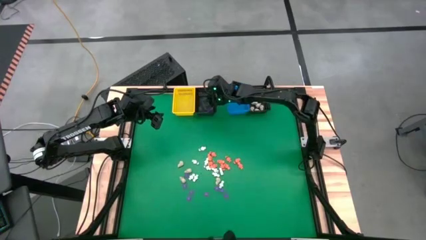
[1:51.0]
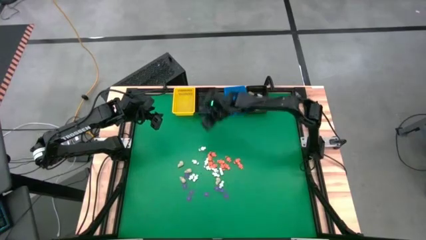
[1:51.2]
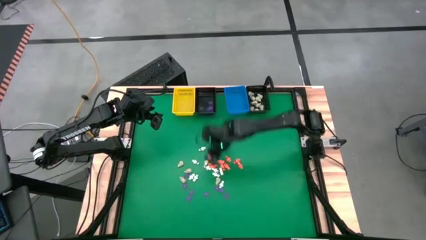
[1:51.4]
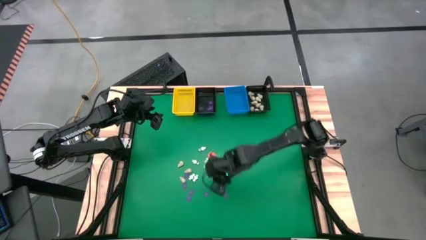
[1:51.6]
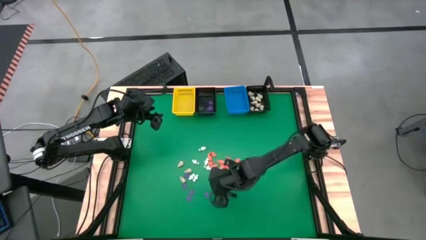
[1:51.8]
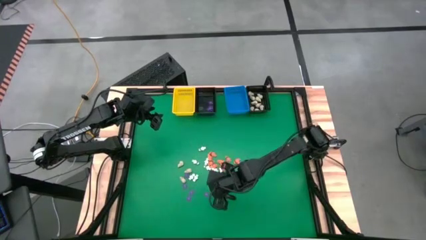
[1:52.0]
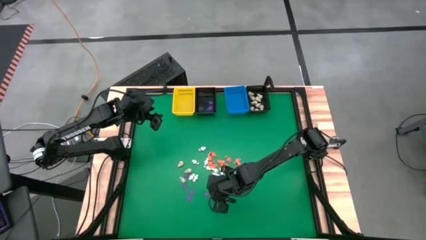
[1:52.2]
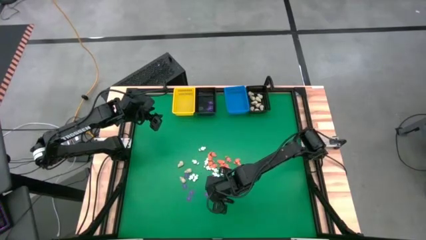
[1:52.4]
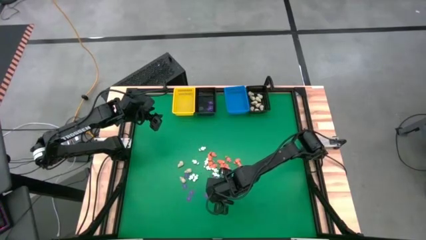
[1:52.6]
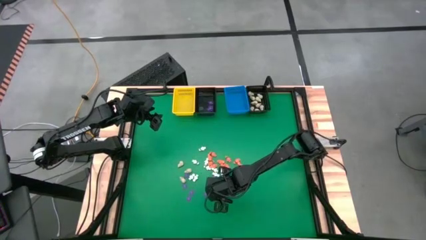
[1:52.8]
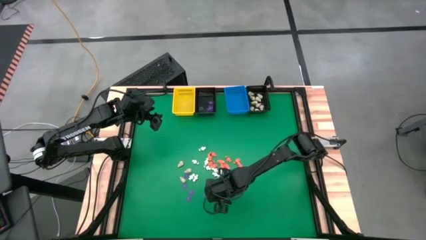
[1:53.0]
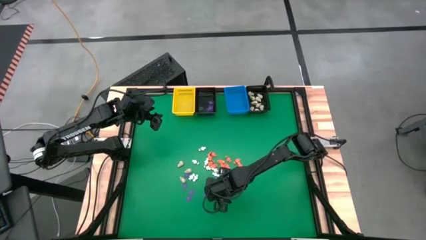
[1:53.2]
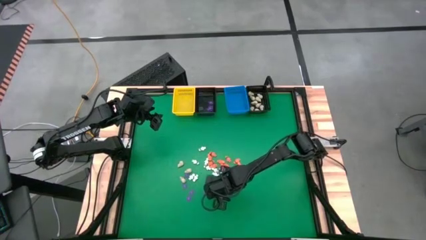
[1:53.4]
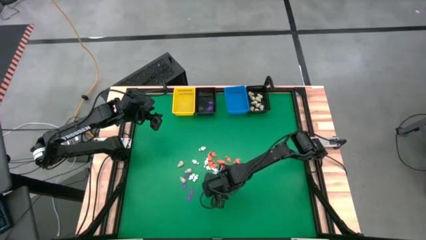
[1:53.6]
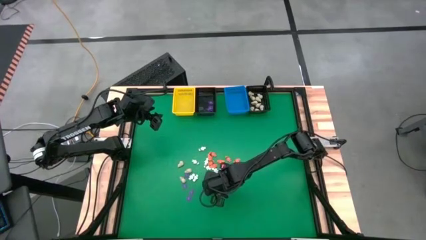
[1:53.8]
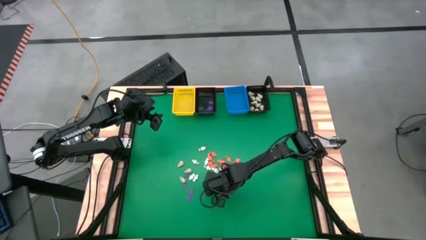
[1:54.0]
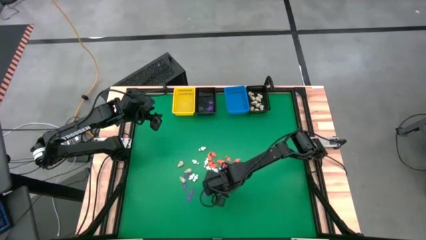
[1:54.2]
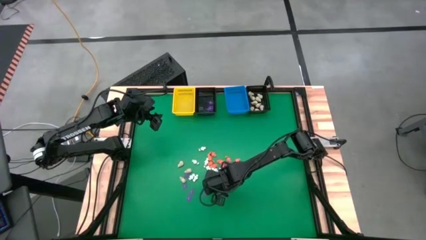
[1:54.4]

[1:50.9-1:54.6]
Task: Sort Halloween decoration
Put the purple spider toy into the left black basket

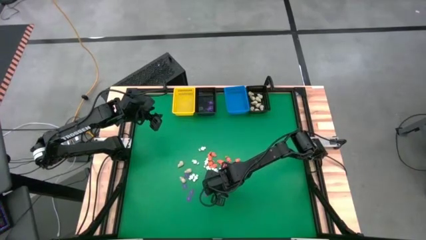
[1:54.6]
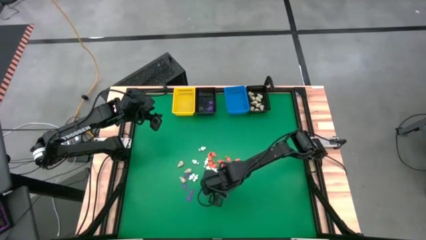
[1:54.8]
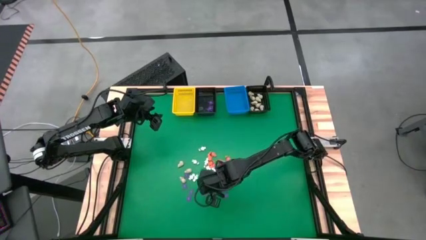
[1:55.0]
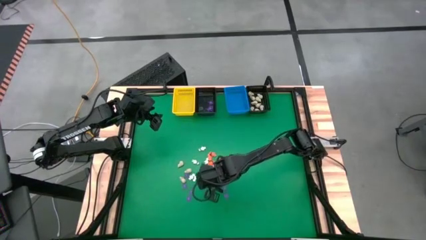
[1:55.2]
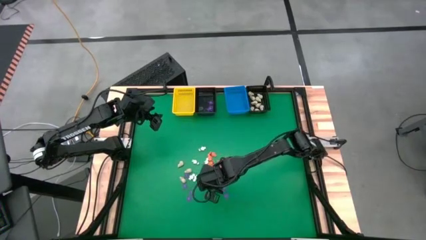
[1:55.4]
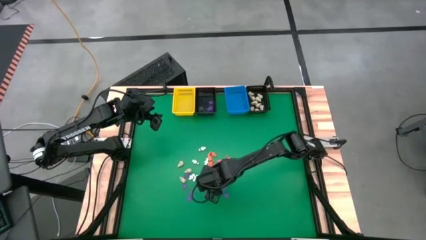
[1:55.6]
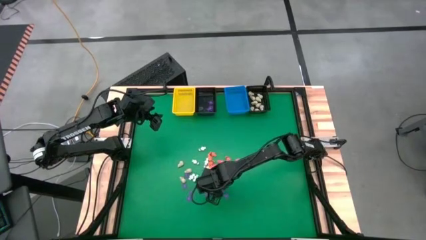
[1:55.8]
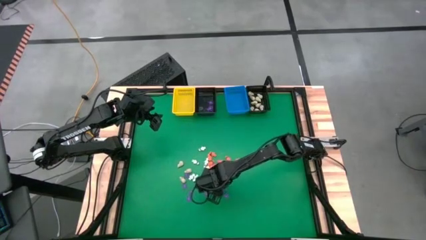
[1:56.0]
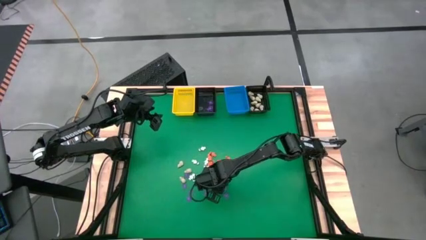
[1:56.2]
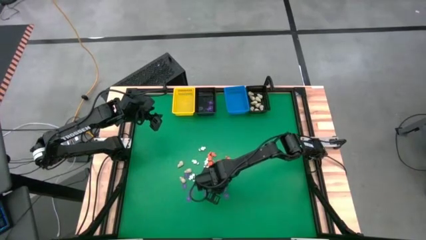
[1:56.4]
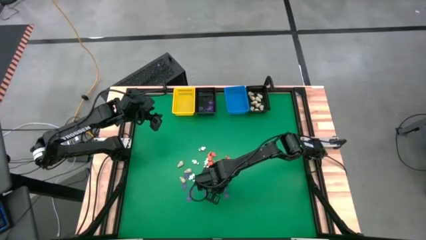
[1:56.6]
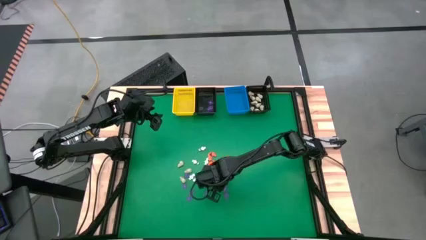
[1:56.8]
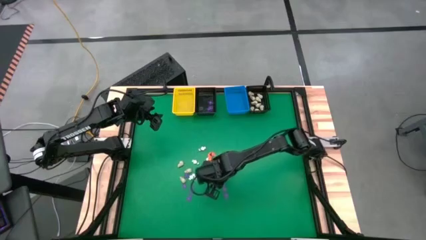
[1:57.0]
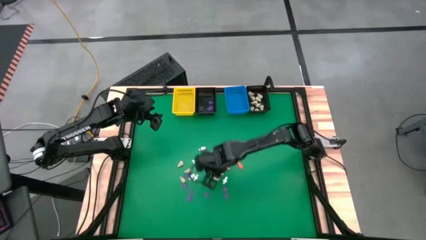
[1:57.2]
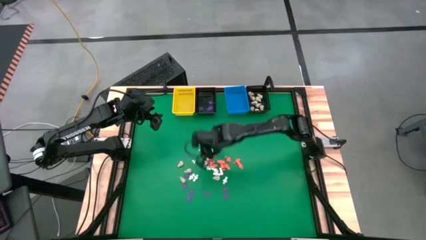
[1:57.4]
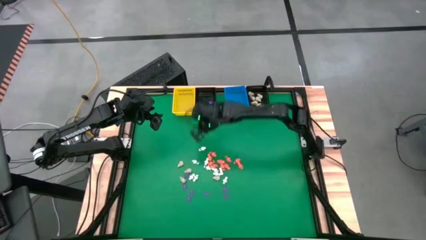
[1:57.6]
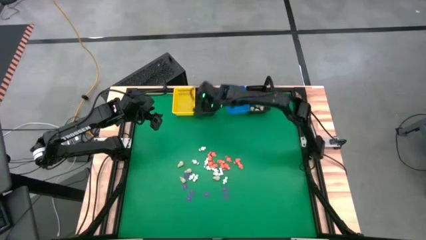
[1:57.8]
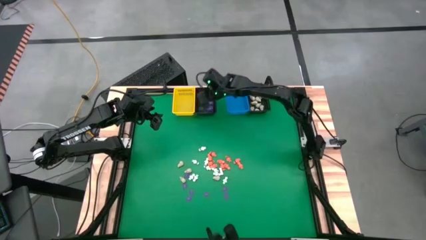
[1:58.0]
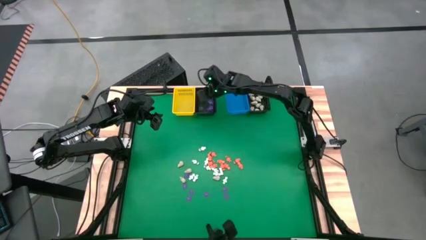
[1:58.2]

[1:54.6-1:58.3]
Put the purple spider toy into the left black basket

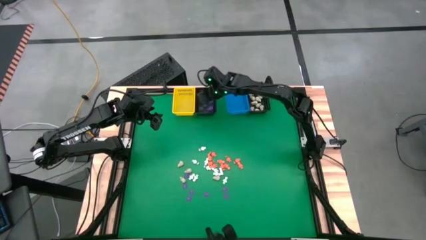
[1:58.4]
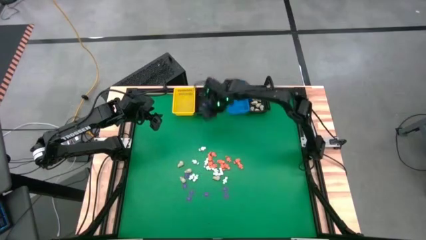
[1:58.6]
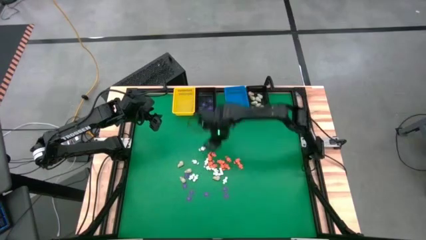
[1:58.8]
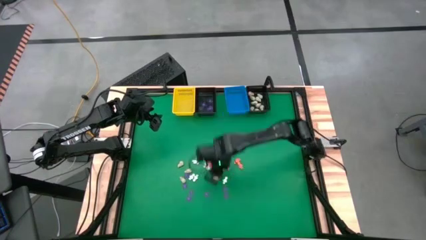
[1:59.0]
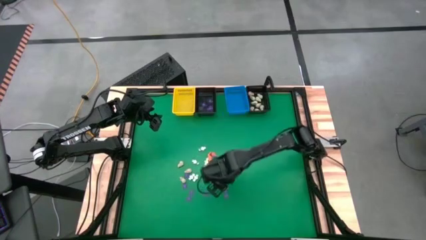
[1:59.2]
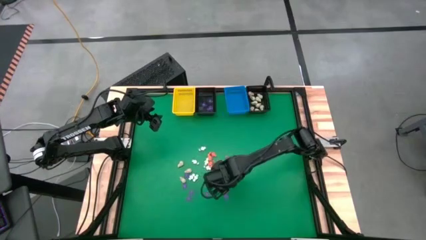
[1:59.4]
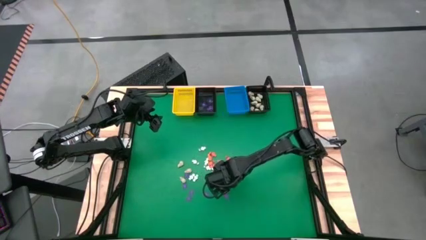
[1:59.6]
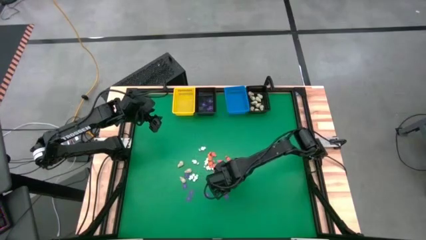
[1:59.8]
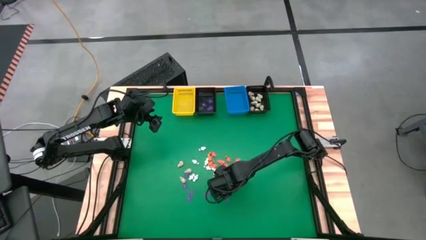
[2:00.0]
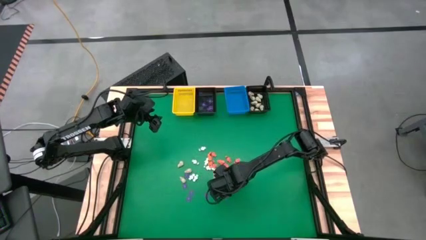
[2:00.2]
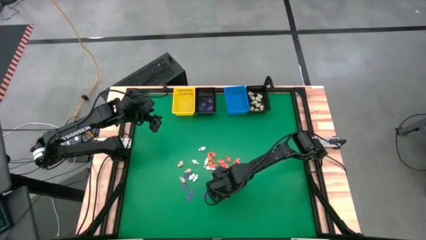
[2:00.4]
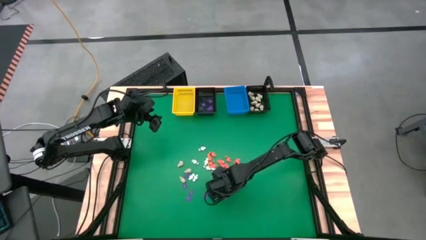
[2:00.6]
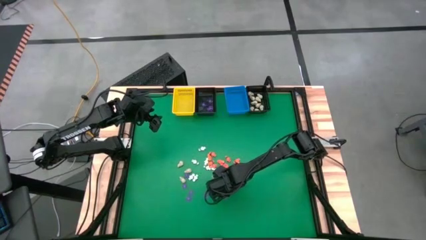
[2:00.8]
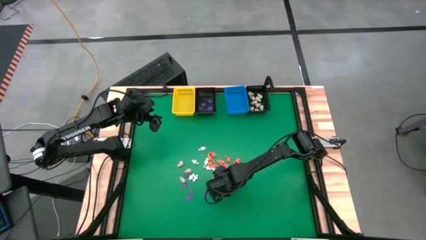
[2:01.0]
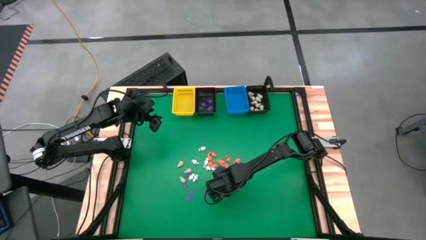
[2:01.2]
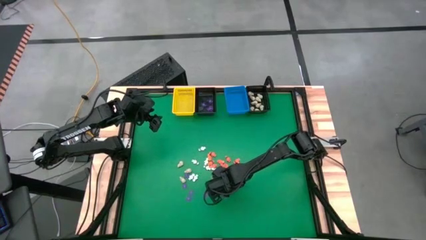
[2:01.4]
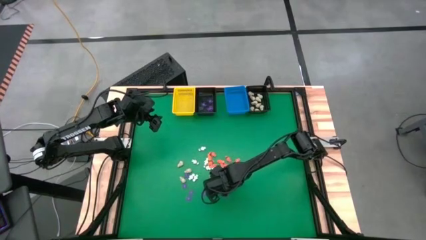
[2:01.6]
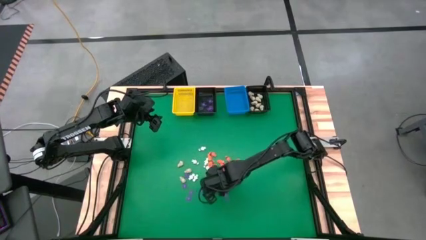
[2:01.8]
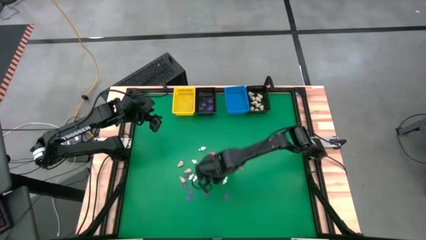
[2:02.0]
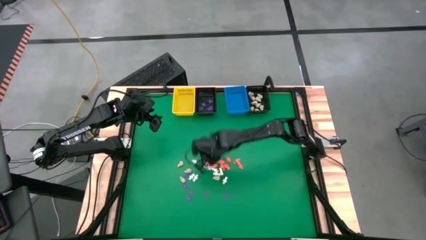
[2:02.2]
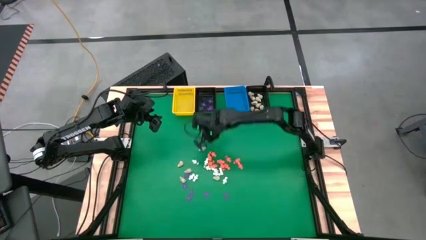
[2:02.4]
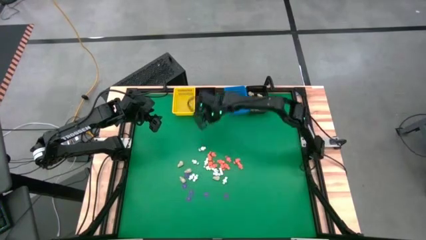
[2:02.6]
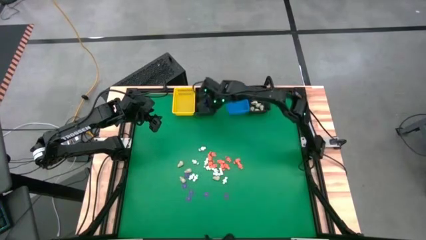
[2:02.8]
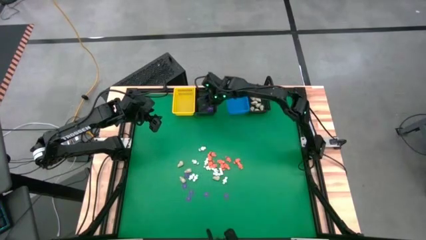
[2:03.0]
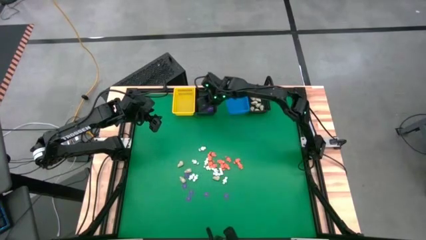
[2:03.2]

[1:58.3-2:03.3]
Put the purple spider toy into the left black basket

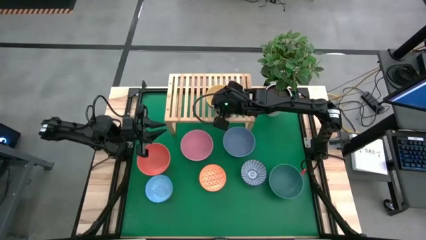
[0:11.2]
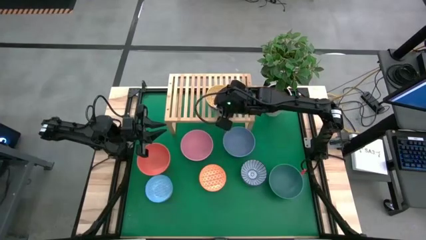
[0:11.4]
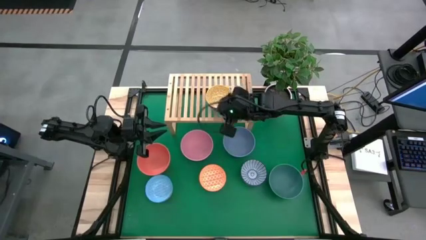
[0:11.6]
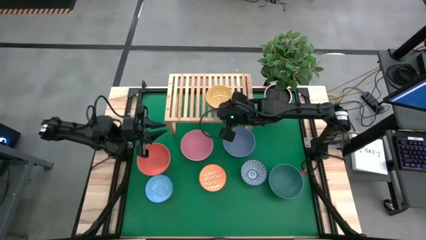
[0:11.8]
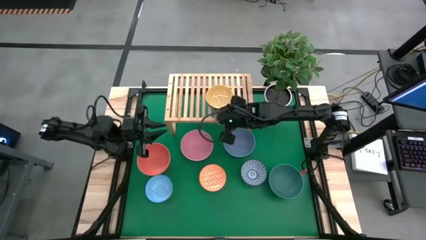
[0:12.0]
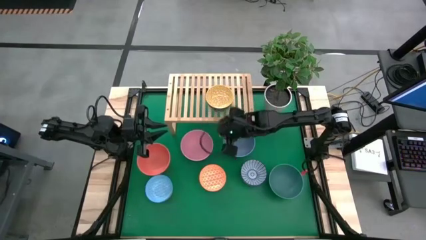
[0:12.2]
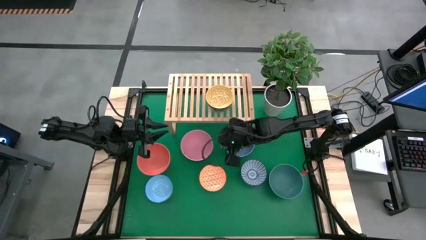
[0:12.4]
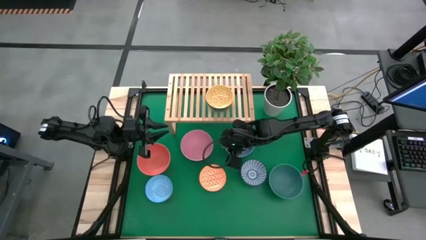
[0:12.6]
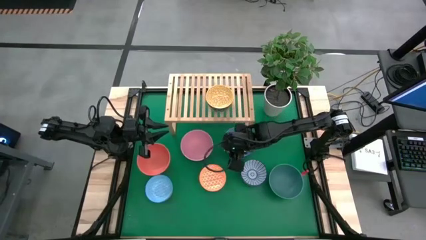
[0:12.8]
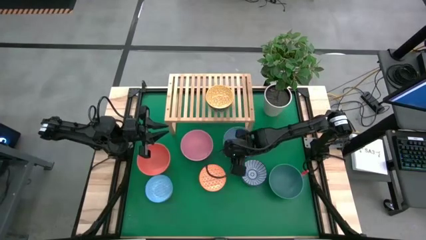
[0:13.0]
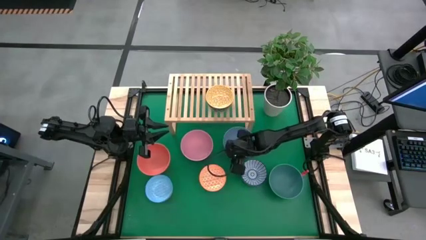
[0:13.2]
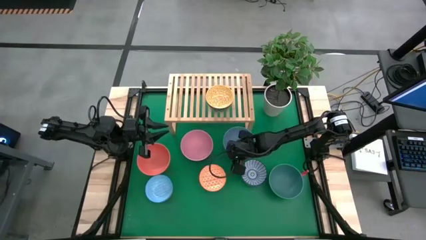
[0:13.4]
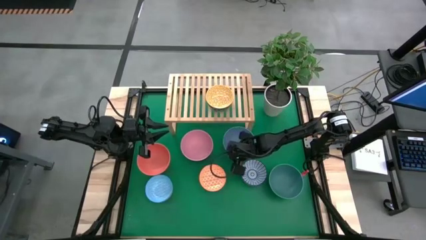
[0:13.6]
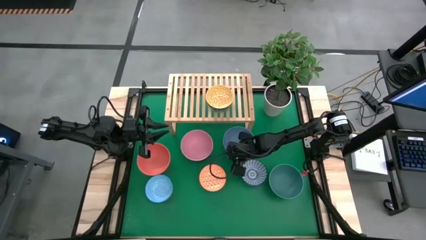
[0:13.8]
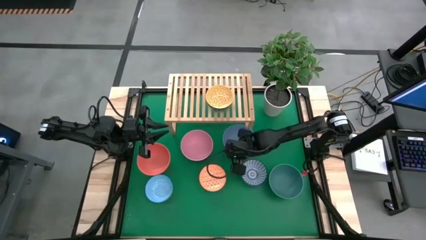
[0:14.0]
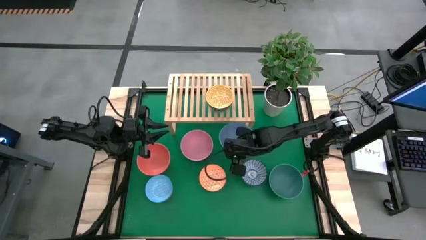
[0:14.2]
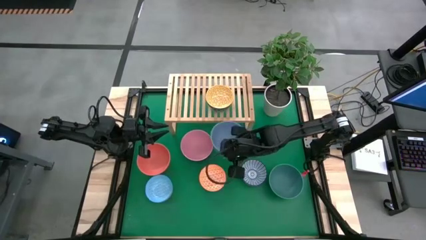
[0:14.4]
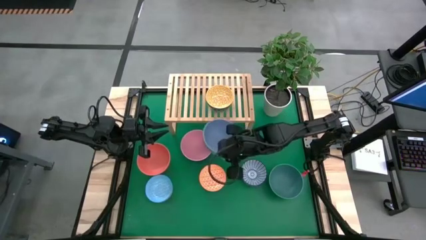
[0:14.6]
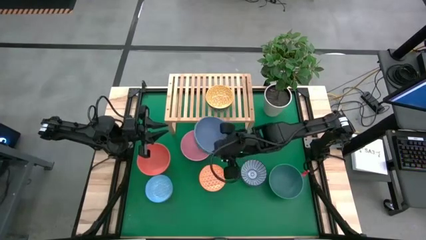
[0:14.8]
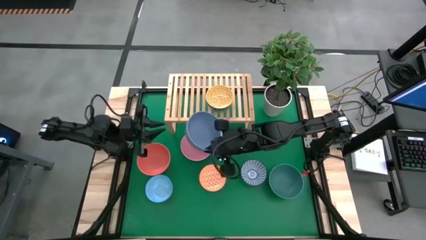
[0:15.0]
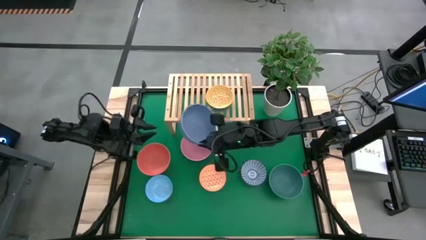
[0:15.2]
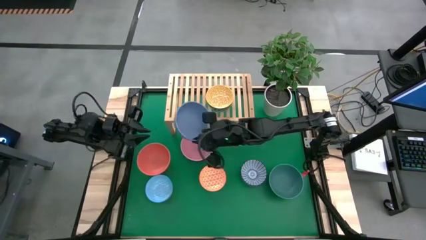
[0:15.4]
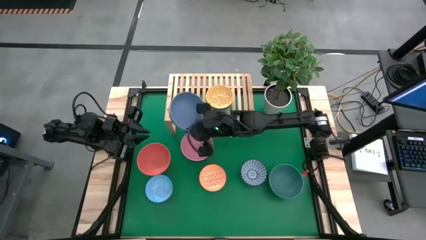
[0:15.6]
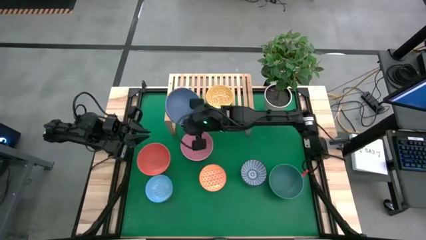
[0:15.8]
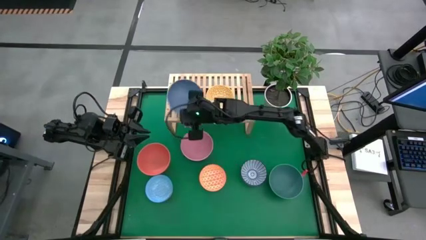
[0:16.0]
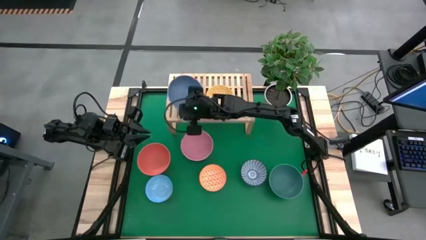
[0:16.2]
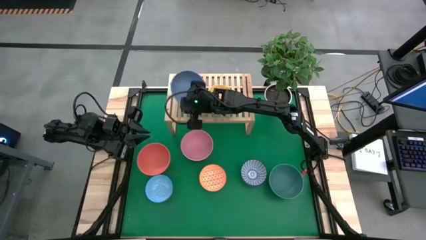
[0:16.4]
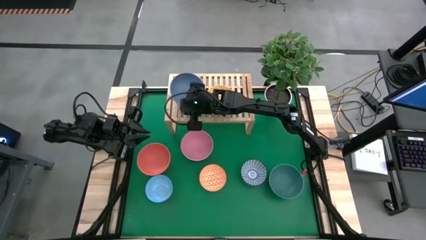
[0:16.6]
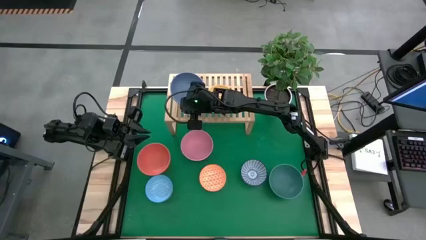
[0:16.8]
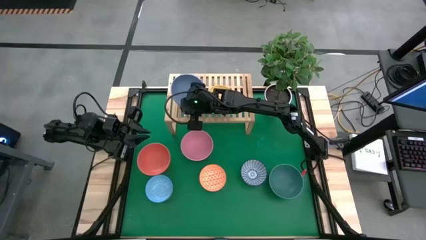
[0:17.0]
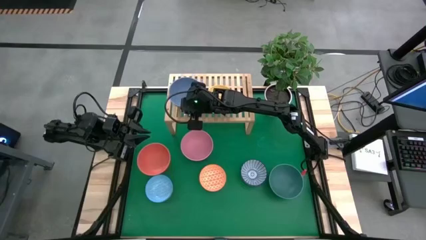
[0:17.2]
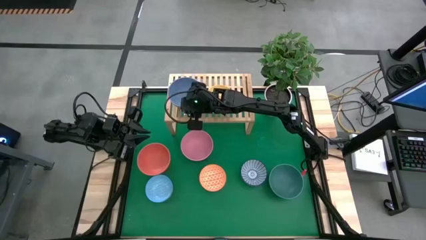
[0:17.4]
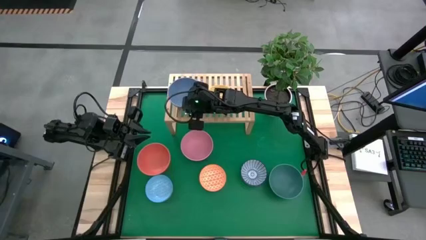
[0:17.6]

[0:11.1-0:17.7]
Task: Place and stack bowls onto a shelf
Put the blue bowl on the shelf
